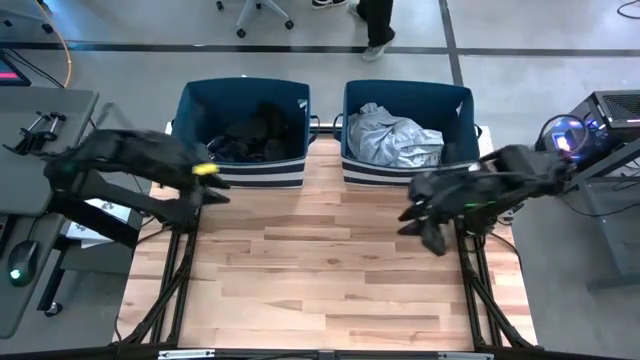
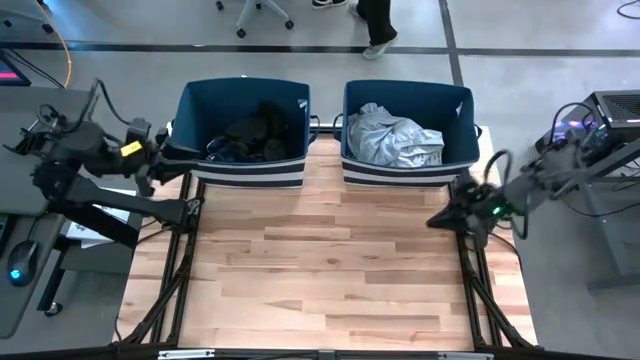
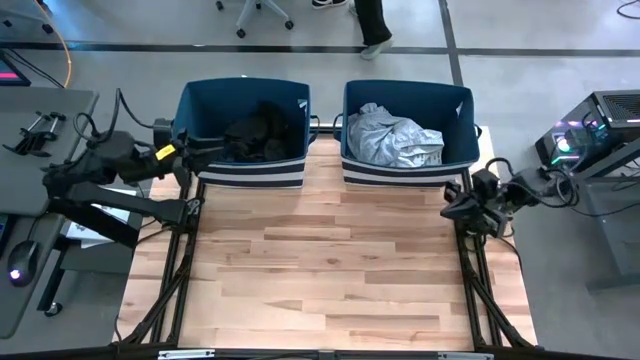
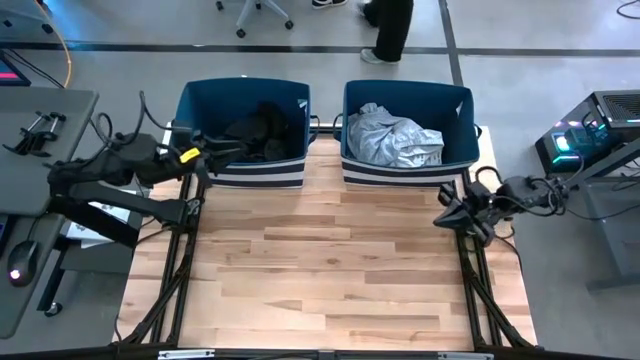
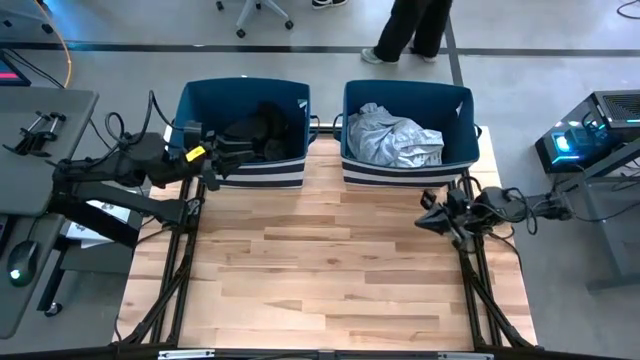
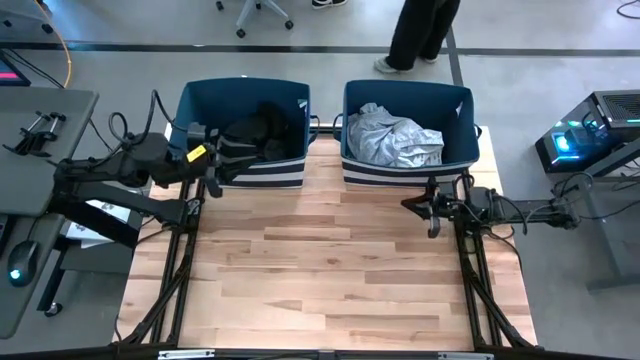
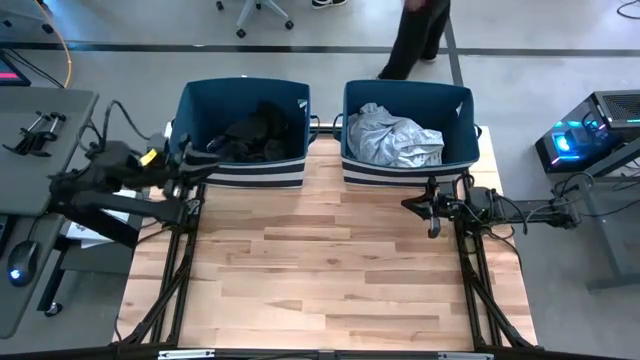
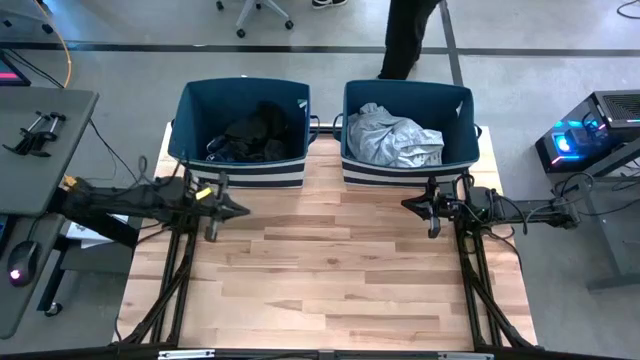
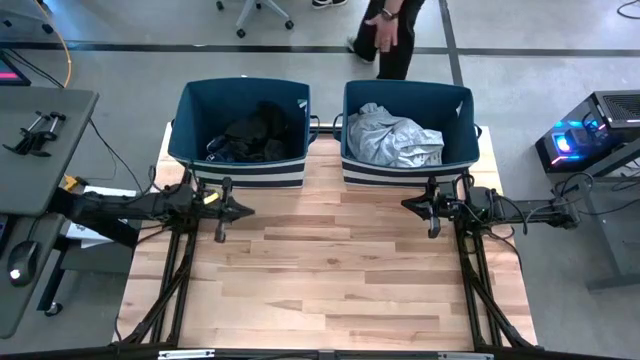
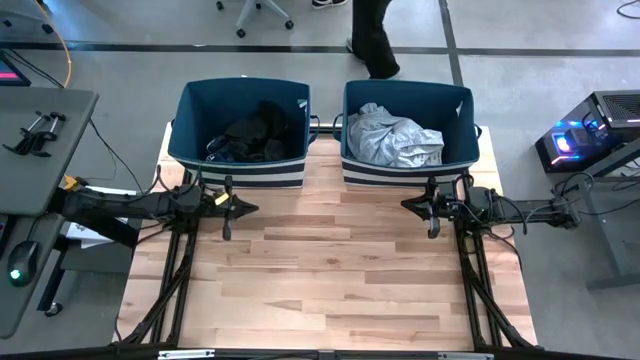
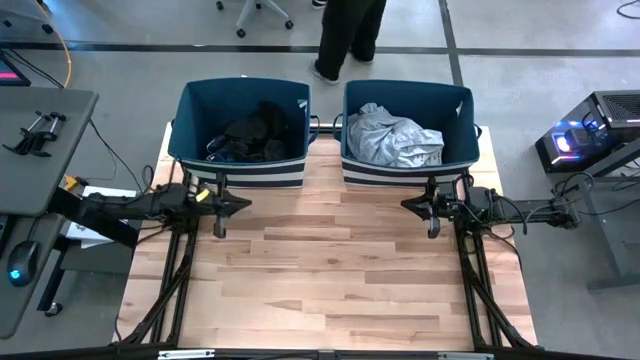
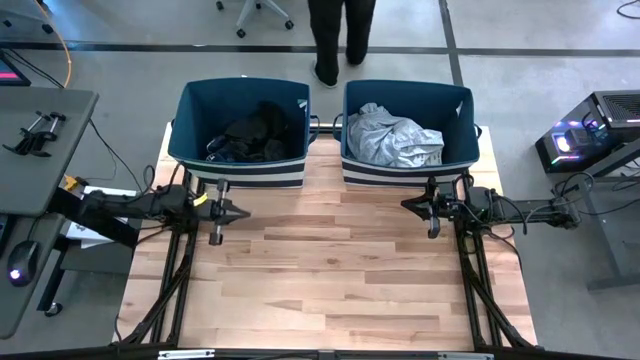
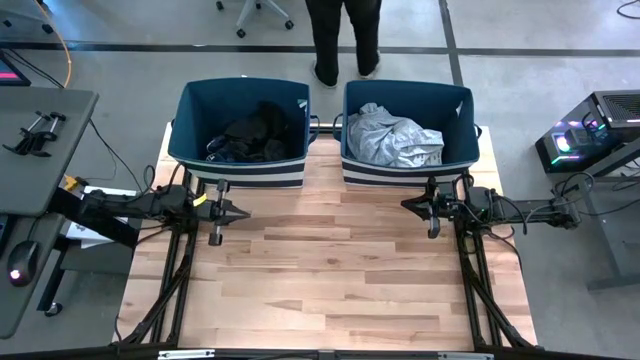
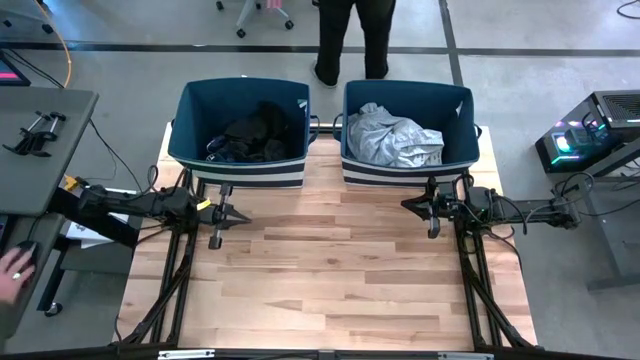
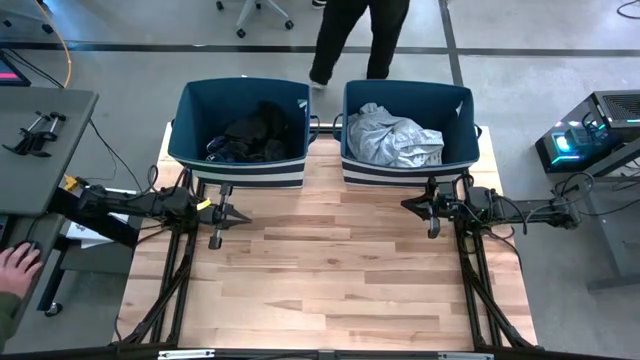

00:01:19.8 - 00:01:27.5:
Task: Sort clothes
Return to Home Position

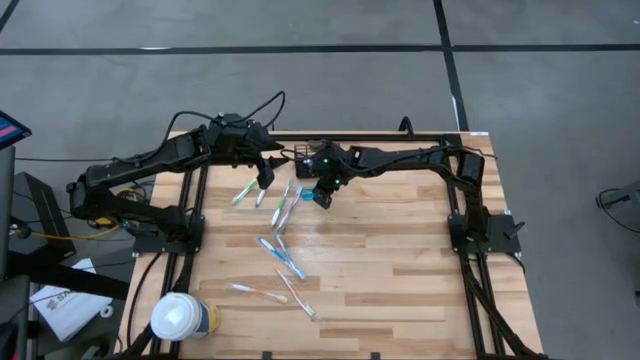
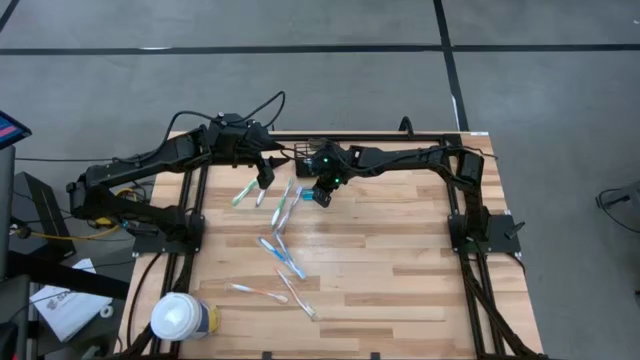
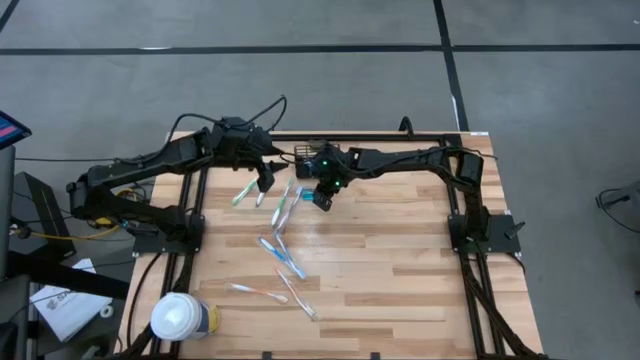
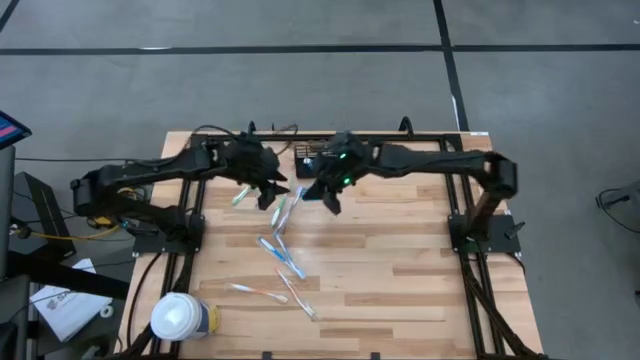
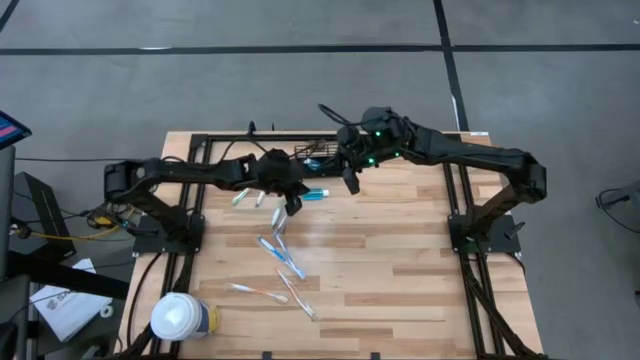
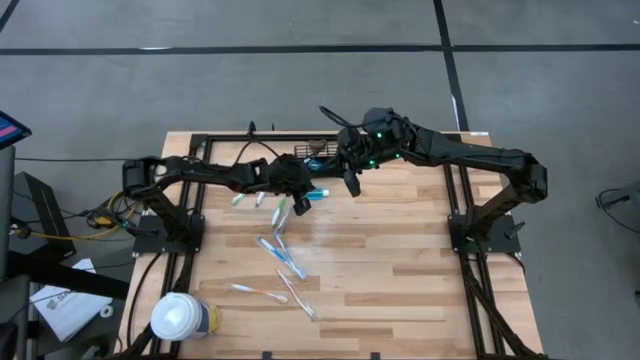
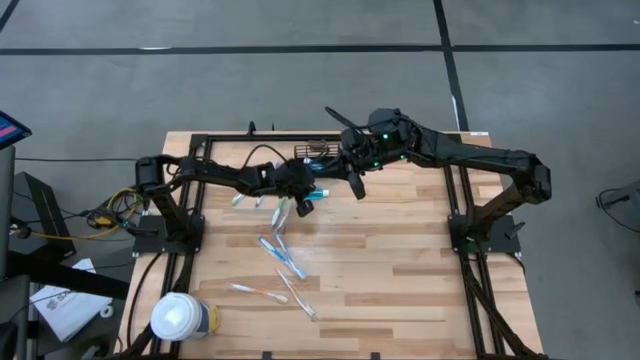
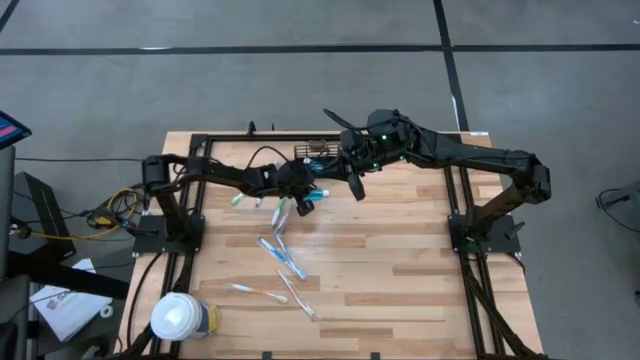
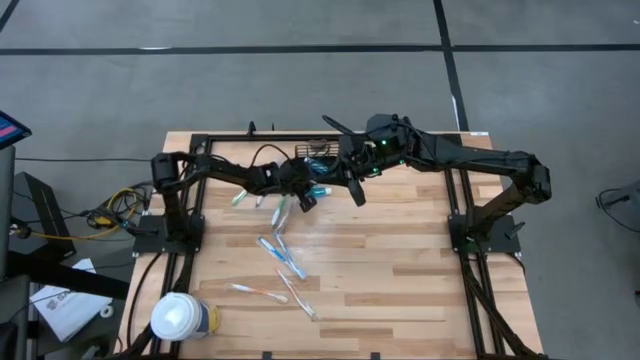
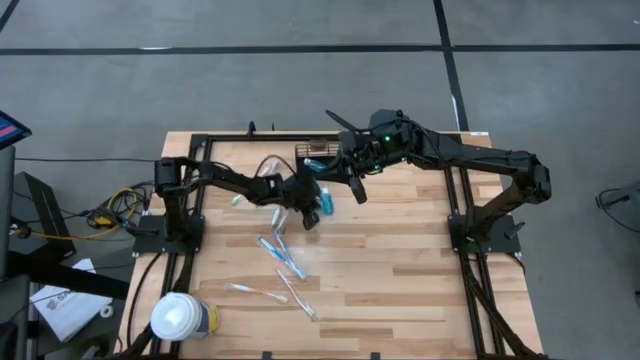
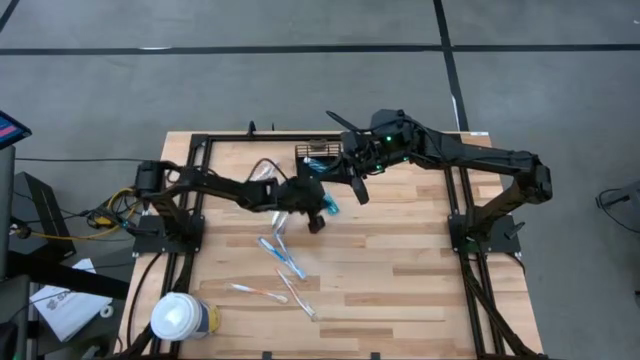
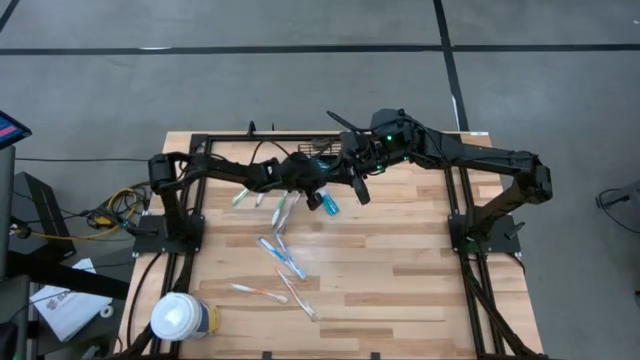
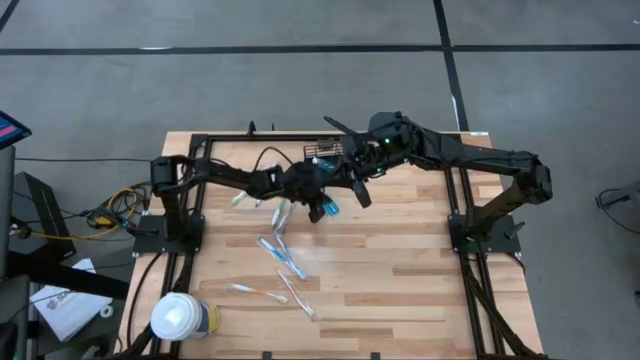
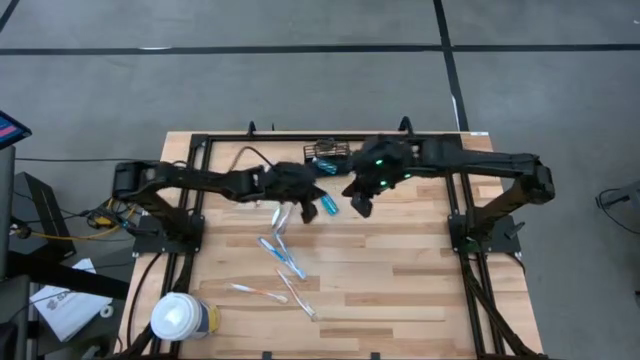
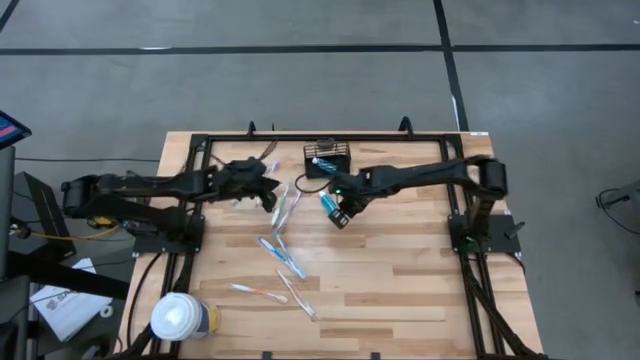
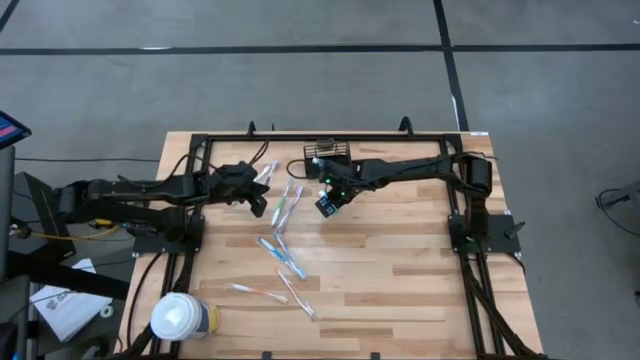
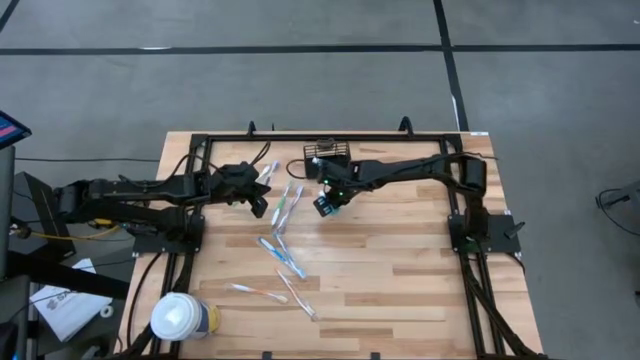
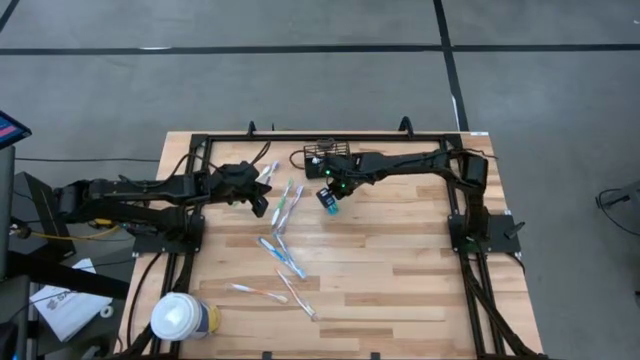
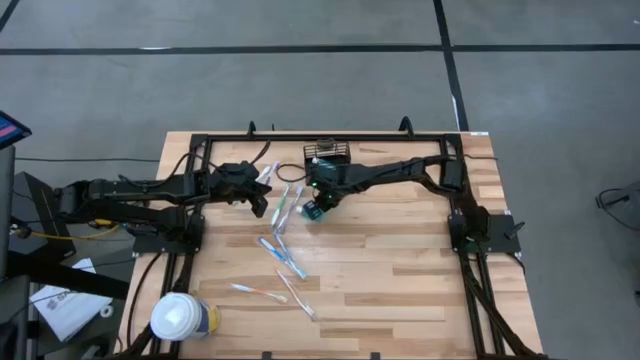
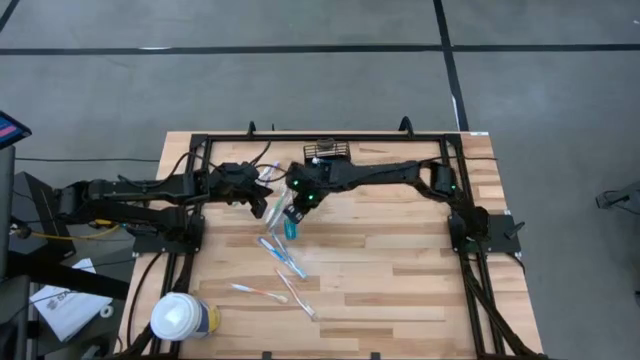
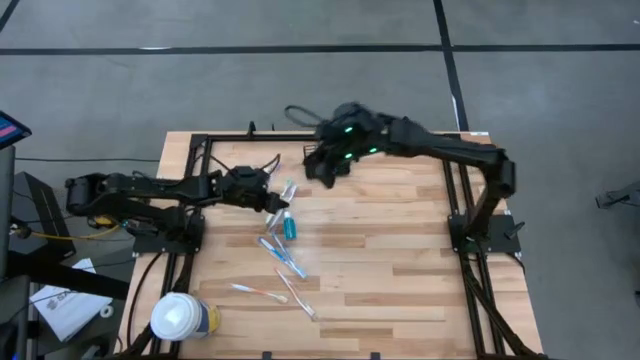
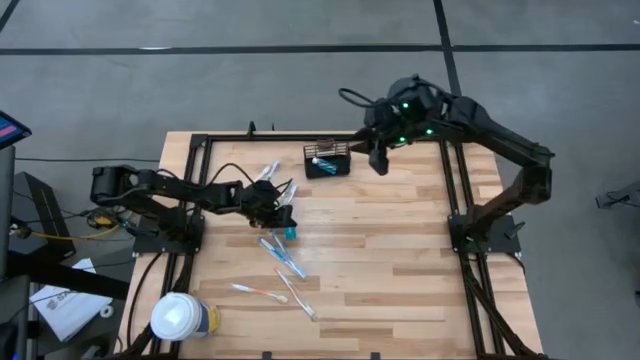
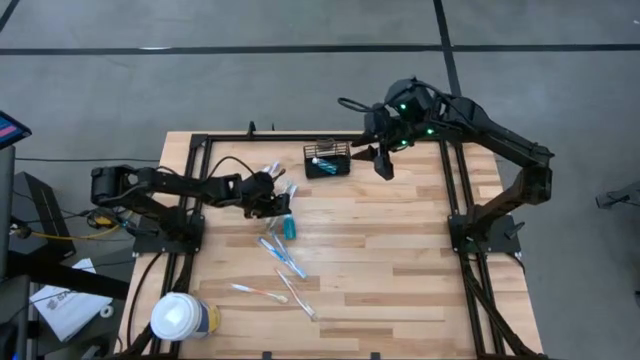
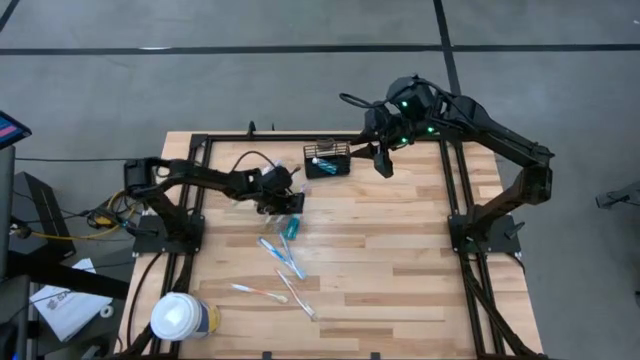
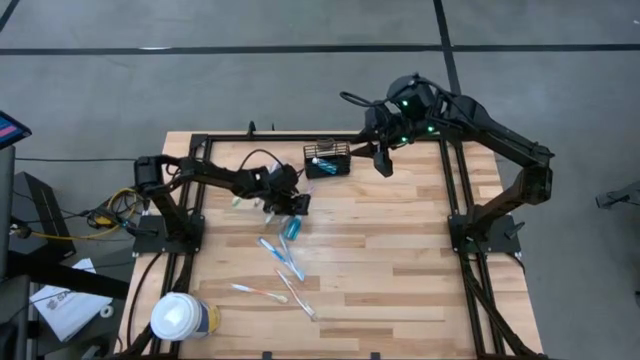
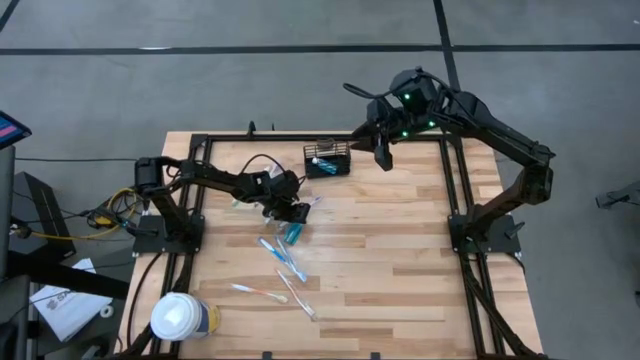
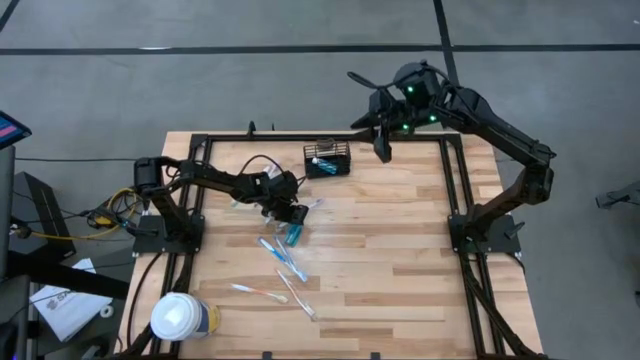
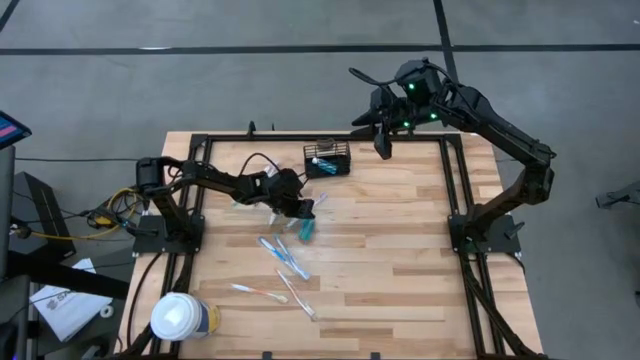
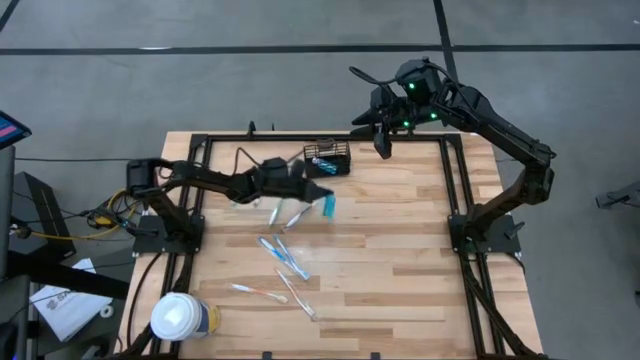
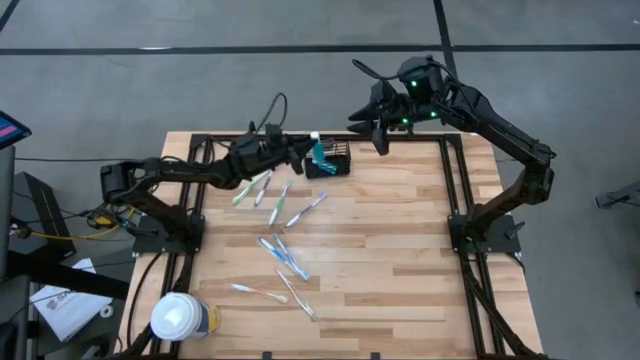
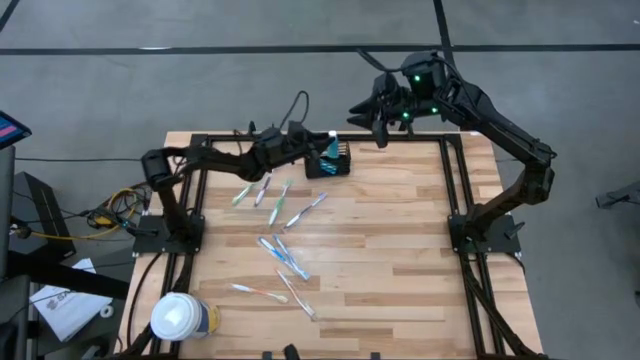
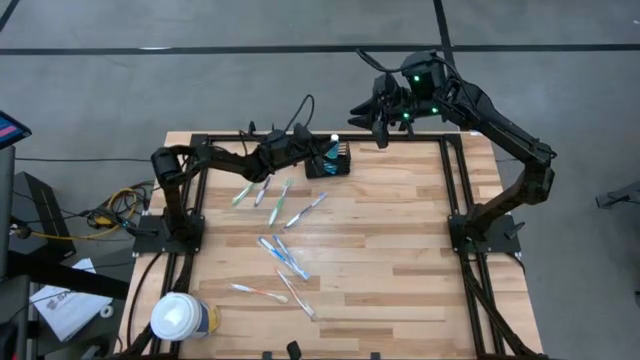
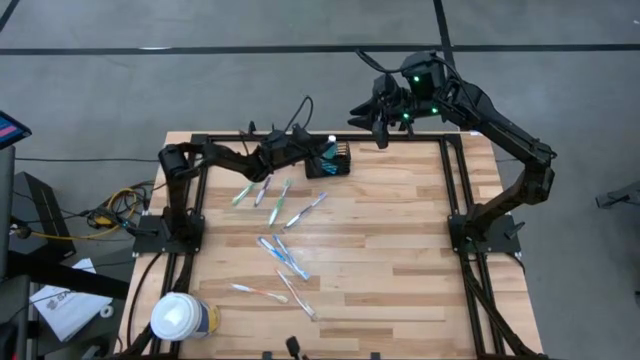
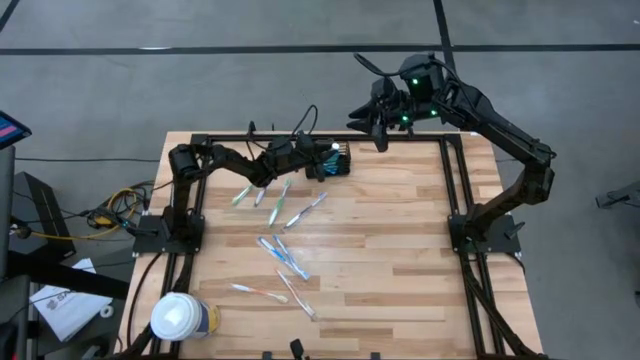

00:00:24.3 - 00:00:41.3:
Task: Pick & Place toothbrushing station
Put the blue mouthwash into the black wire organizer
